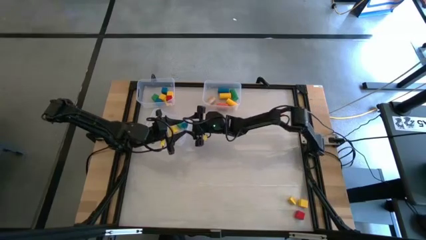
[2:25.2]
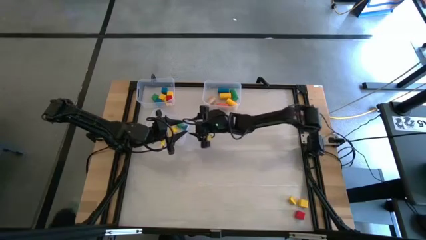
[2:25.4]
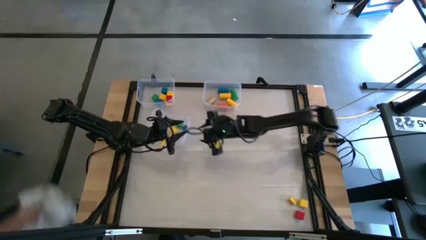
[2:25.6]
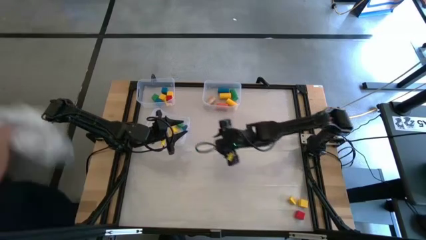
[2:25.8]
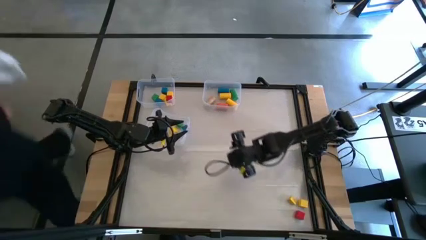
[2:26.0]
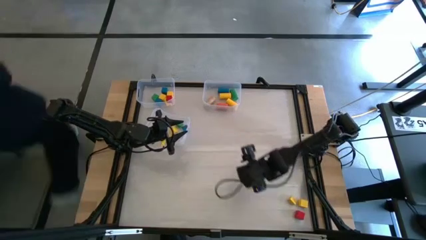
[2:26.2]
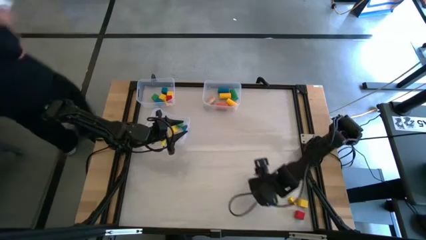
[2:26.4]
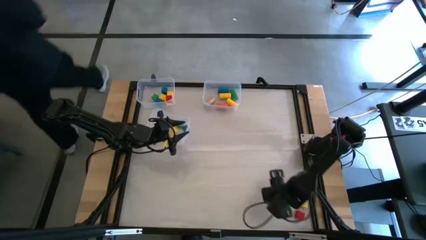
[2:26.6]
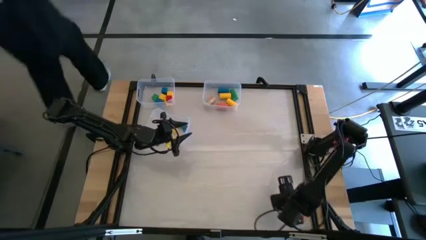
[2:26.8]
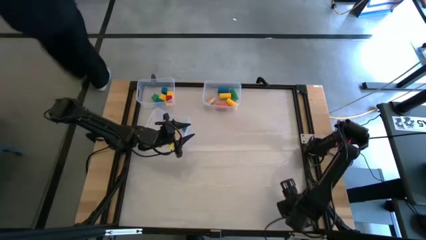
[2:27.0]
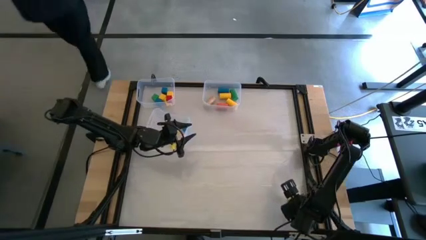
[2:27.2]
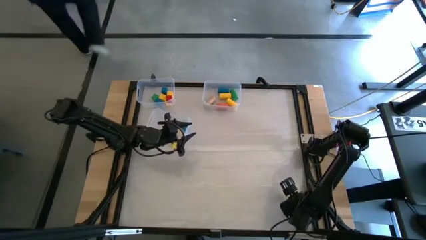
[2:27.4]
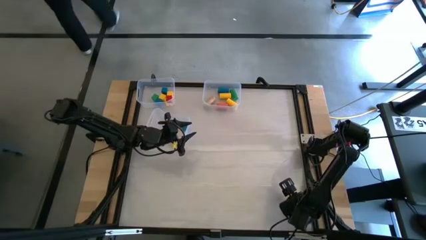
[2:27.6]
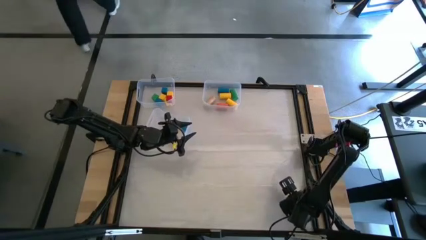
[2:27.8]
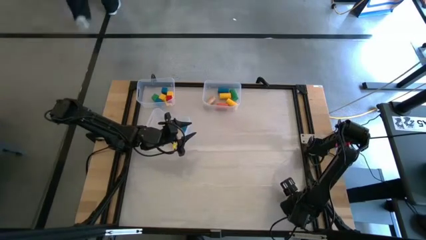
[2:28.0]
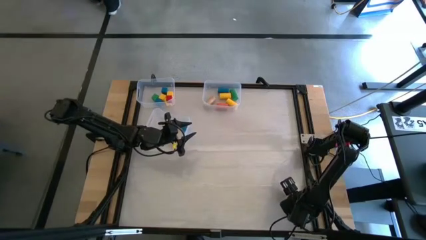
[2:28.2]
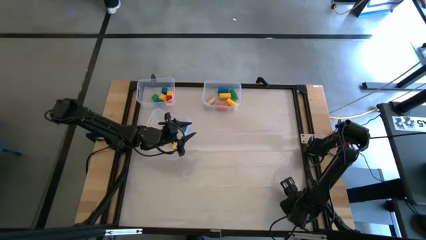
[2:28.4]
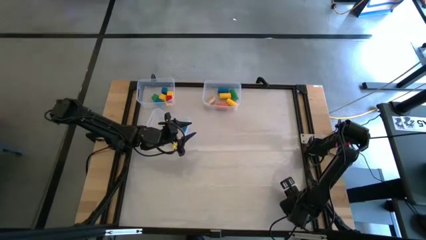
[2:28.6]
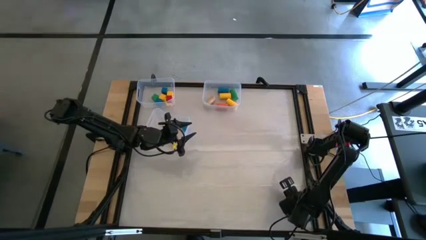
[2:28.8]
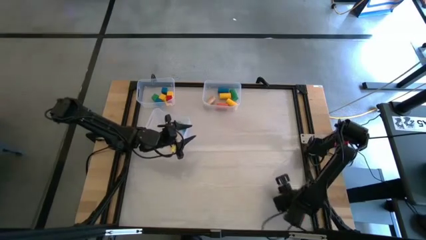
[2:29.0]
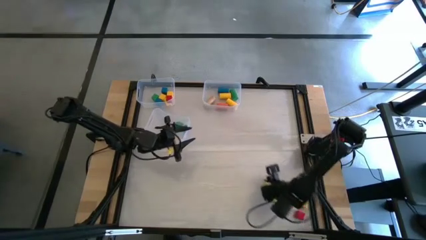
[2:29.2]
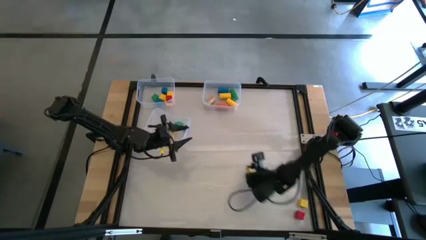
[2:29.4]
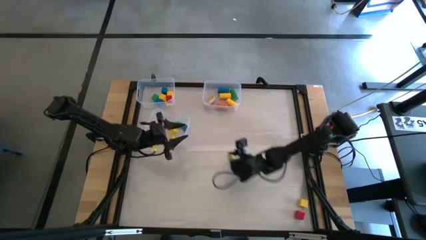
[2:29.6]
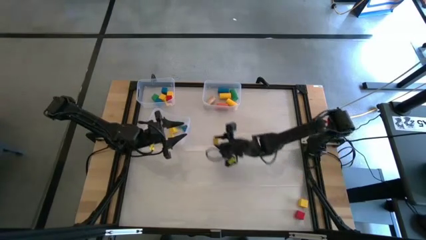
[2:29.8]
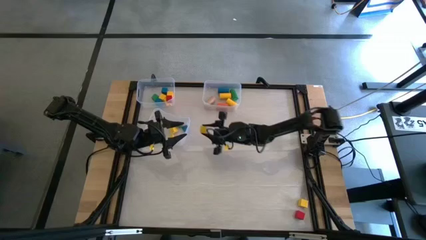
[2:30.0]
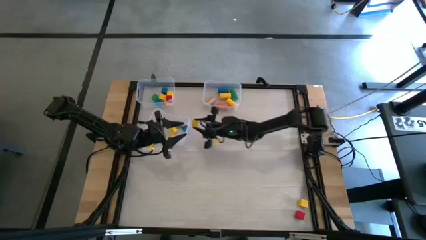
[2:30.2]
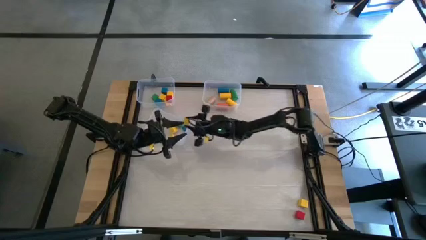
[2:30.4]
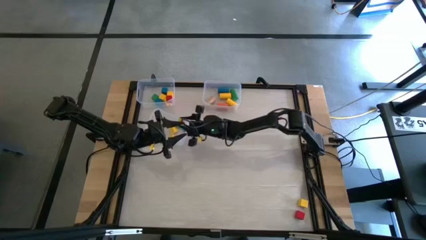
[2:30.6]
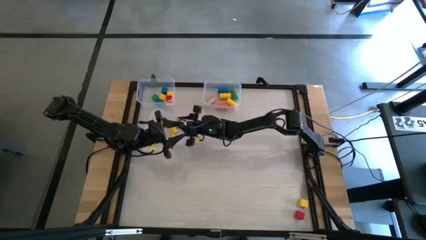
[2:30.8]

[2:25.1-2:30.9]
Task: Sort blocks by size
Put the yellow triangle game block into the bottom left transparent bin

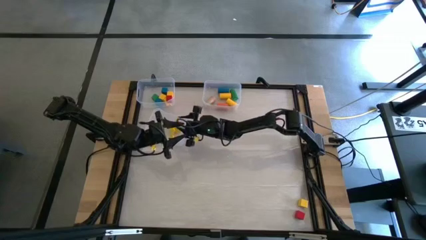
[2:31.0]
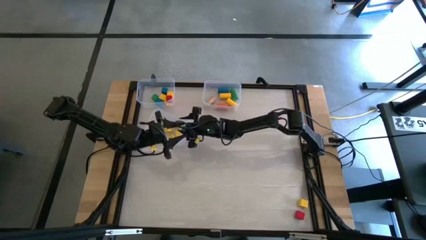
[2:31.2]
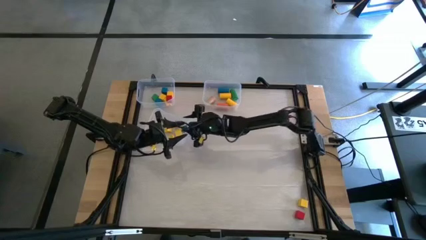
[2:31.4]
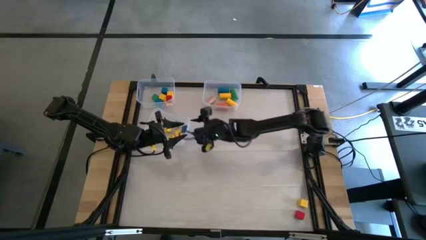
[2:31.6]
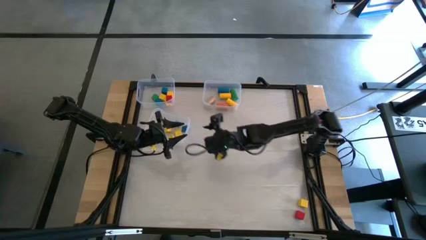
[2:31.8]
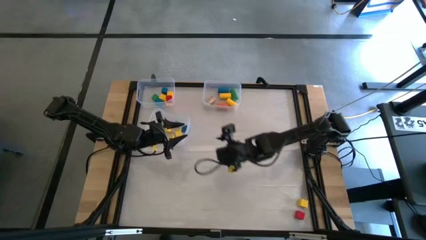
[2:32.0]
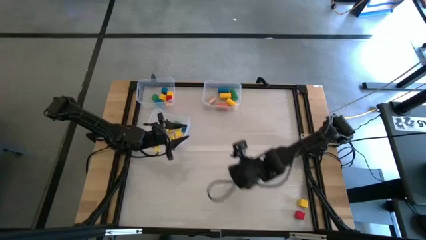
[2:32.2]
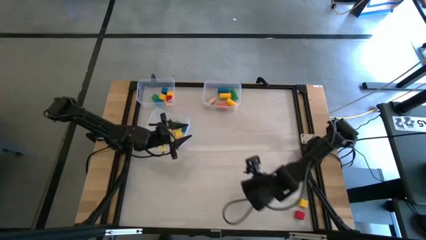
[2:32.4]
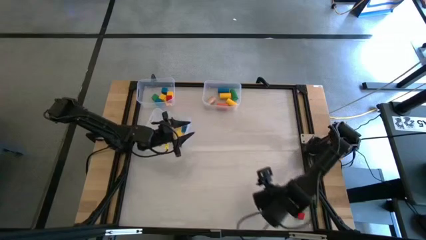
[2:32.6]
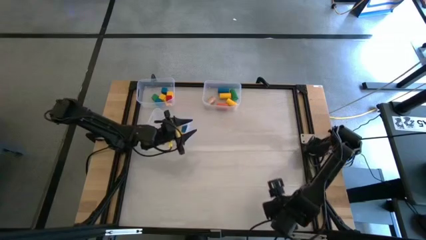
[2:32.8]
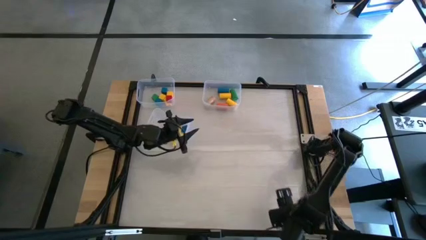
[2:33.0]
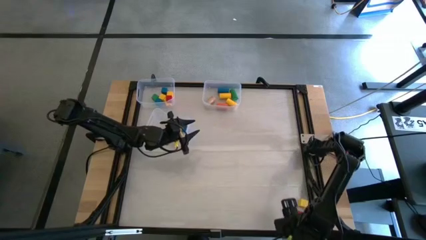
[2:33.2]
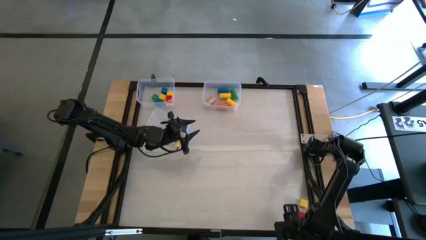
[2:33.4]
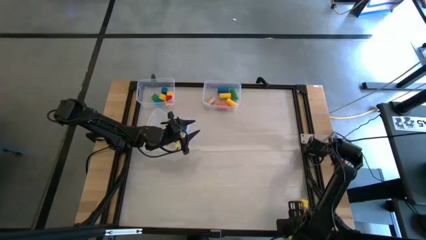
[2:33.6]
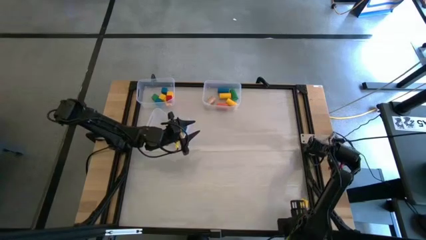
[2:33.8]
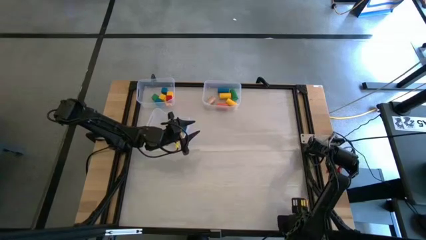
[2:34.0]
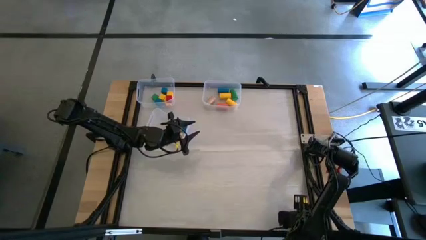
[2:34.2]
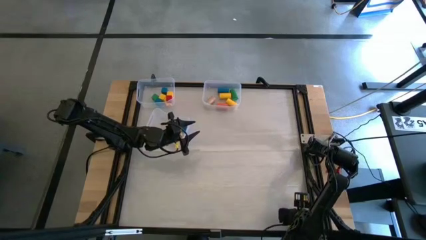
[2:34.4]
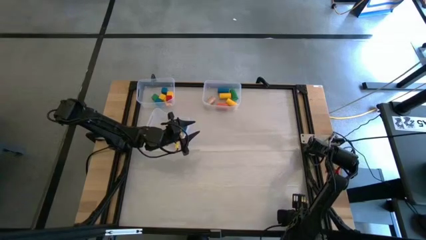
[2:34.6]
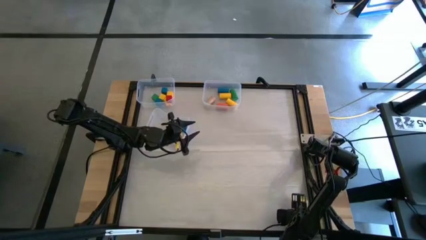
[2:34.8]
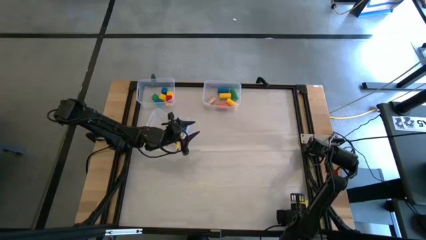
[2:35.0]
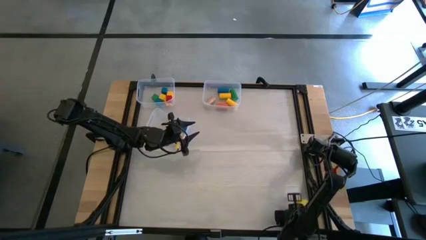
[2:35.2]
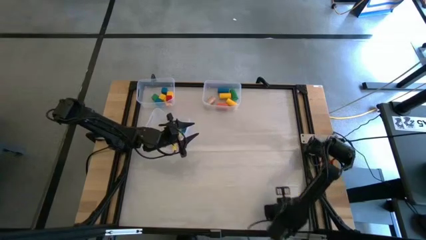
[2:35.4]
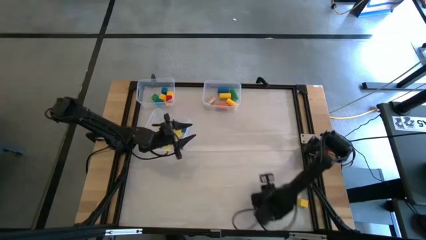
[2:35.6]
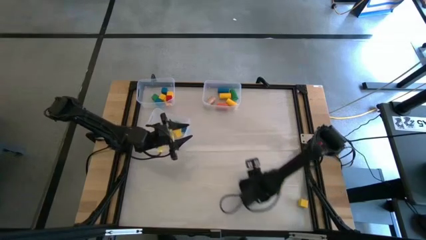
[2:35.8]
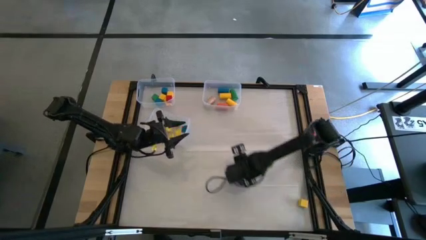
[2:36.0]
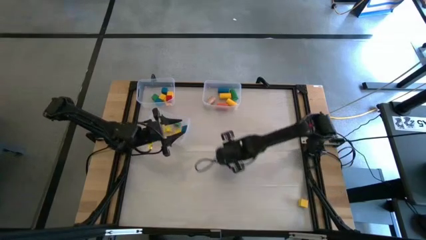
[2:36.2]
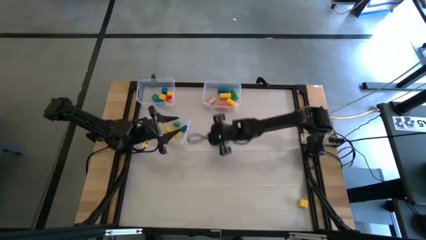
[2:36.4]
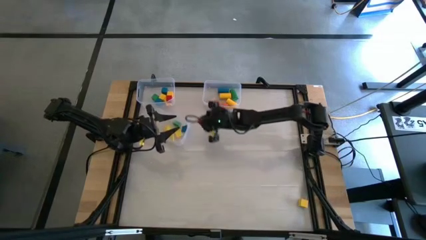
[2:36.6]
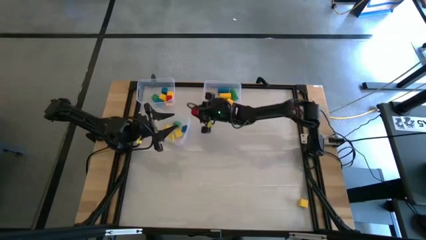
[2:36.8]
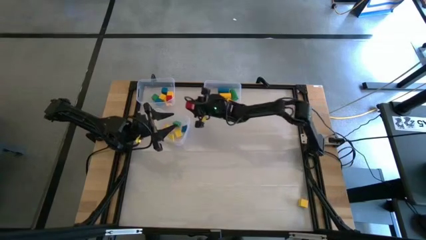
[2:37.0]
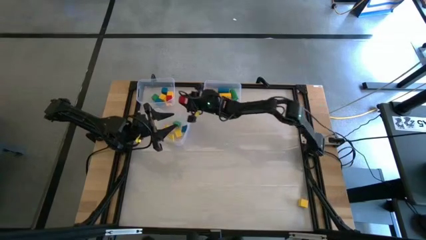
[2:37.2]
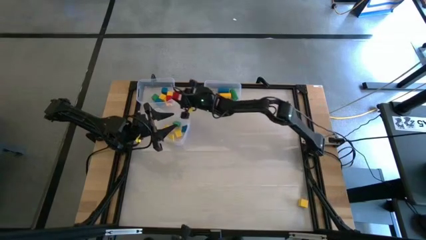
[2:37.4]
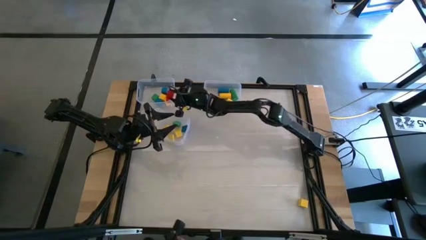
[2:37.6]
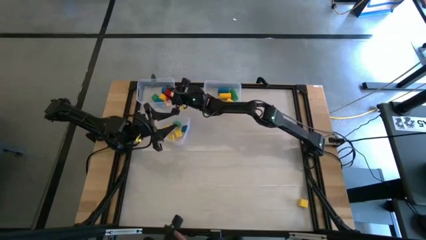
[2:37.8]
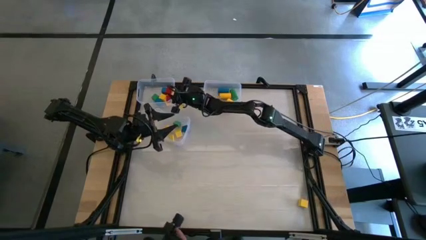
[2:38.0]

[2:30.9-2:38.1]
Put the red square game block into the top left transparent bin

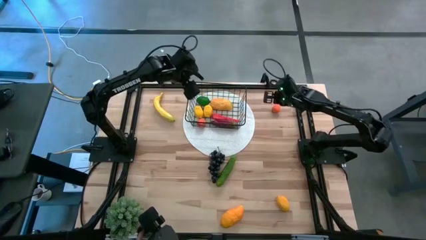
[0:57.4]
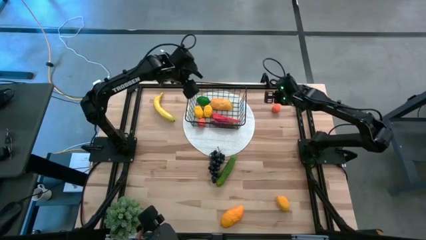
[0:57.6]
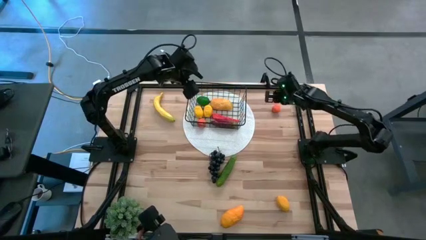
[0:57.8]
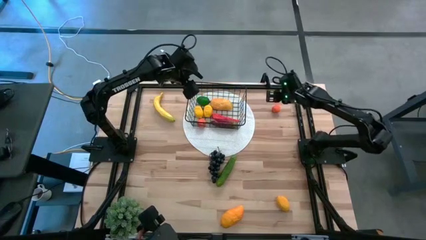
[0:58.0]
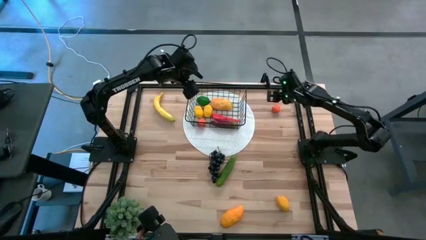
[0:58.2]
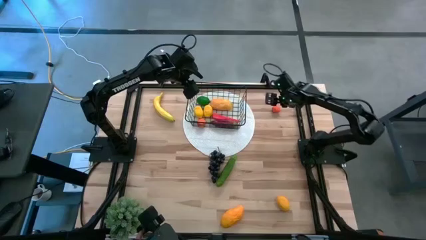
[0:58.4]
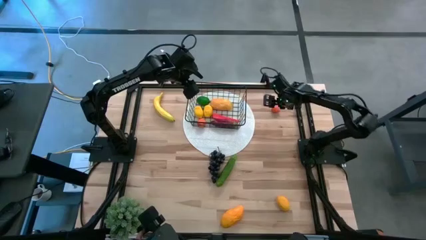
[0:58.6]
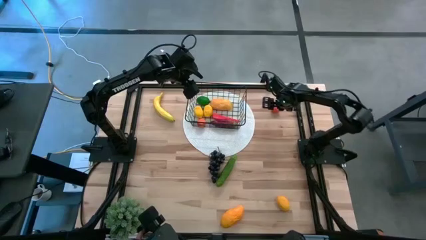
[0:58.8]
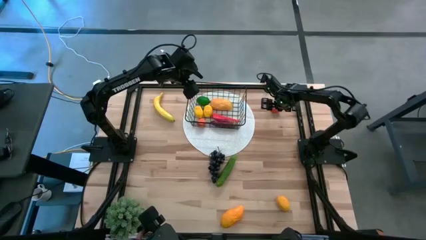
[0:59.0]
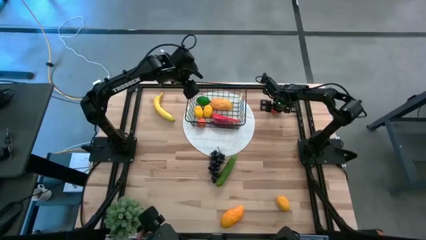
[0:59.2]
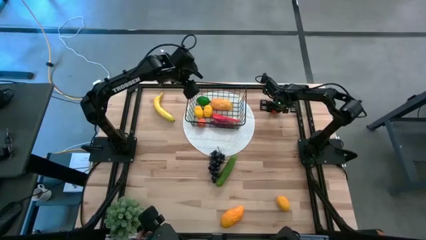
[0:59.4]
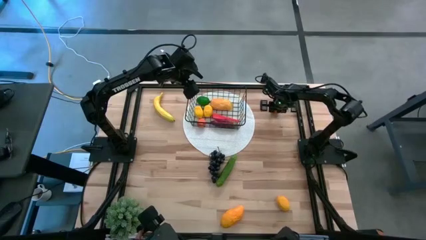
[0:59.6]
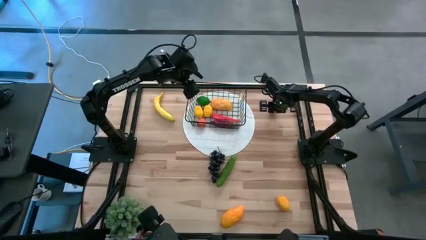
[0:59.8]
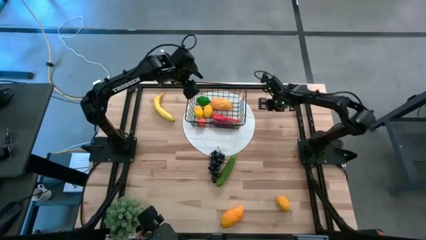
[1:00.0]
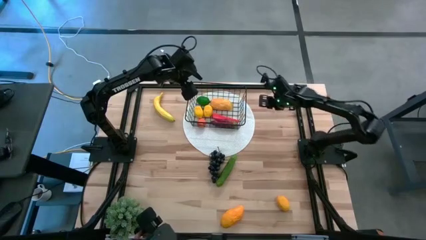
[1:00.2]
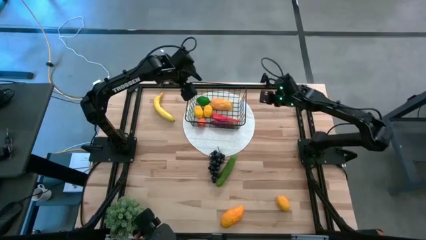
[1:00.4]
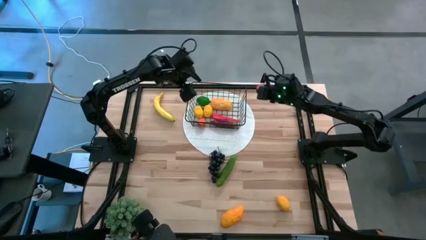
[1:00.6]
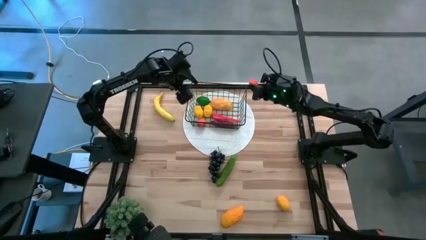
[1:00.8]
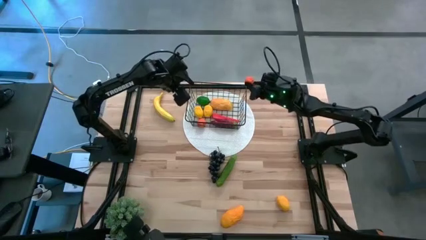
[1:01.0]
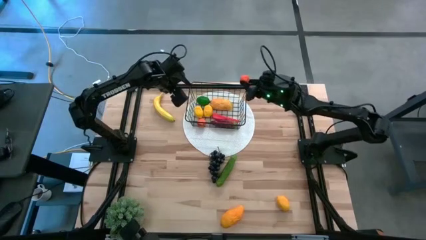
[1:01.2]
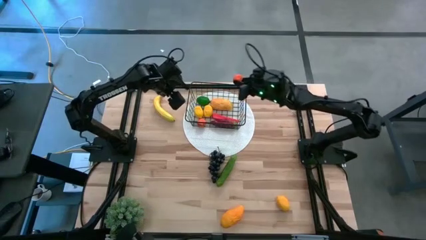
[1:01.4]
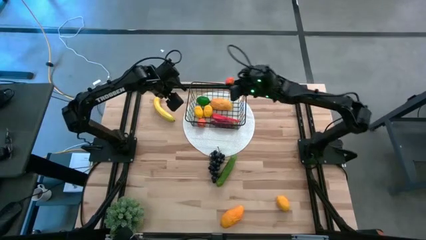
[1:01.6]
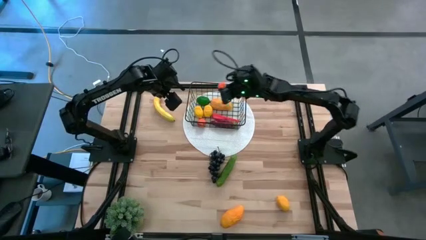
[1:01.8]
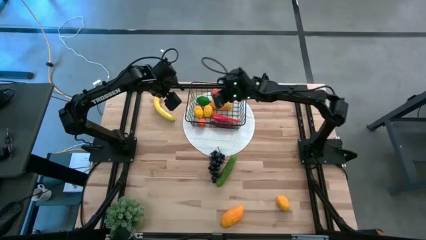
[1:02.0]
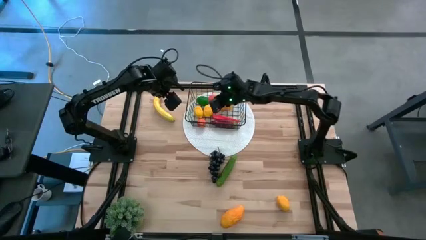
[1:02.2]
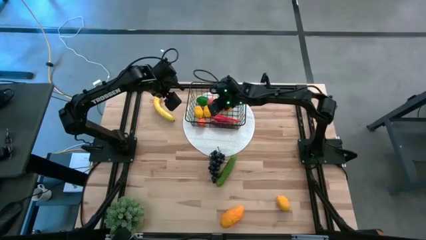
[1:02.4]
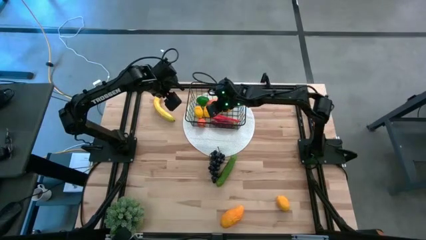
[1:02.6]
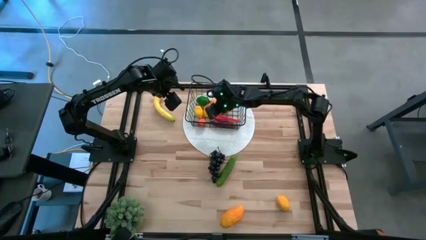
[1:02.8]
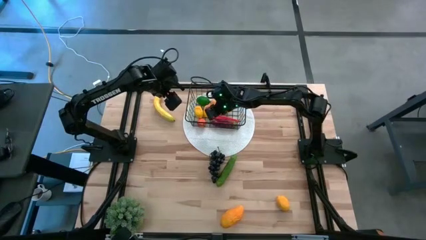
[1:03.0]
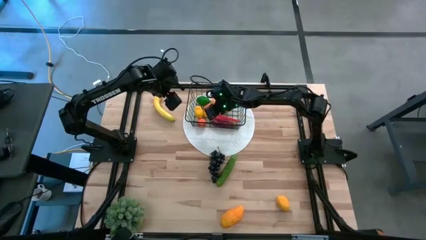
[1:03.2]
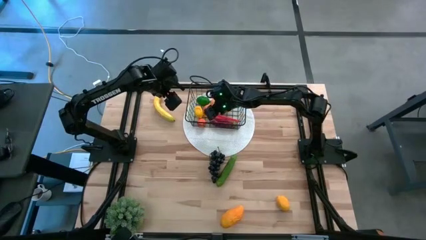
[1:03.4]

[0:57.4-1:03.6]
Task: Build produce basket
Put the orange into the black wire basket
